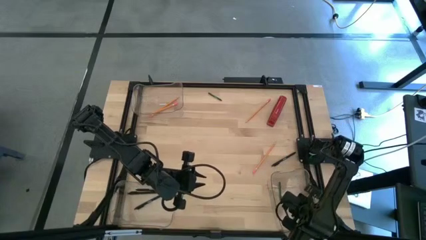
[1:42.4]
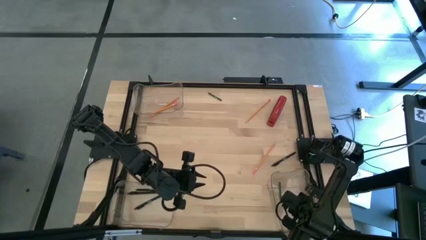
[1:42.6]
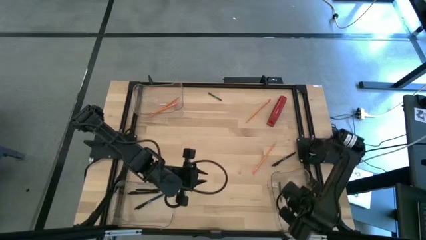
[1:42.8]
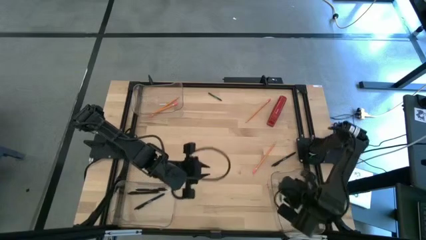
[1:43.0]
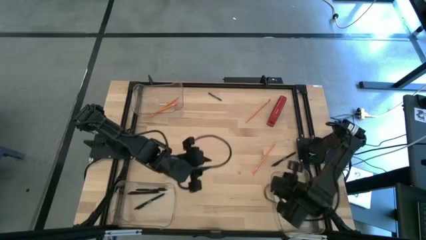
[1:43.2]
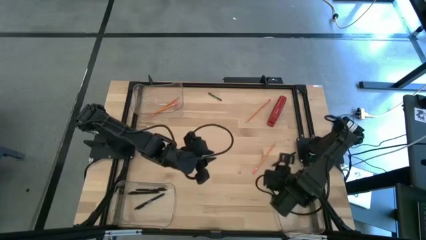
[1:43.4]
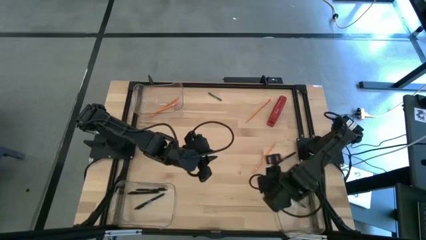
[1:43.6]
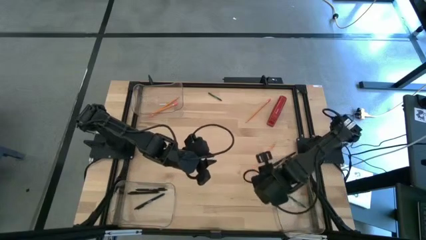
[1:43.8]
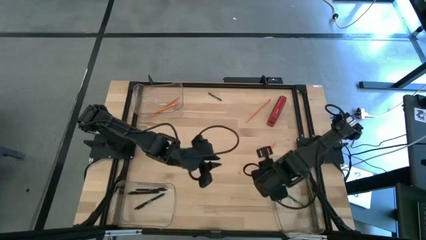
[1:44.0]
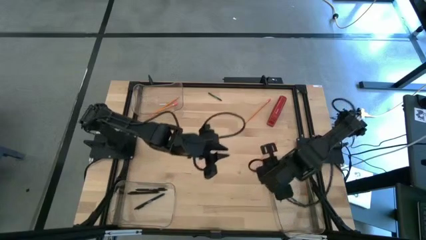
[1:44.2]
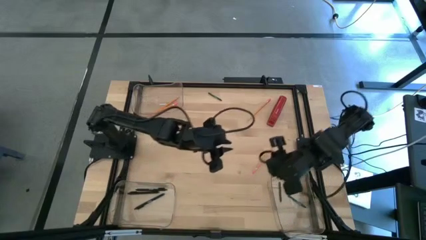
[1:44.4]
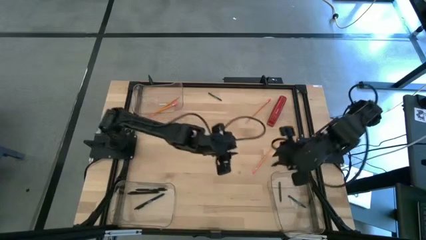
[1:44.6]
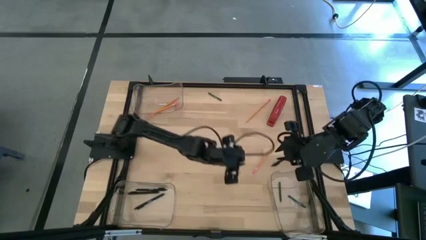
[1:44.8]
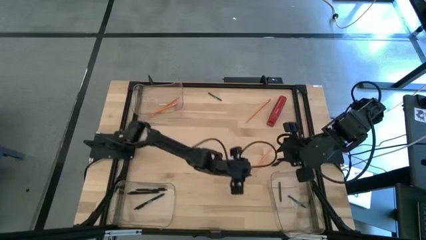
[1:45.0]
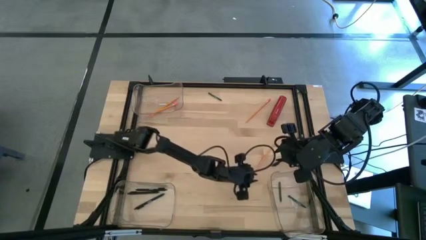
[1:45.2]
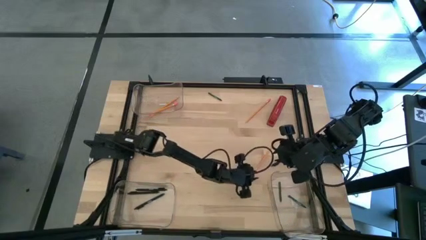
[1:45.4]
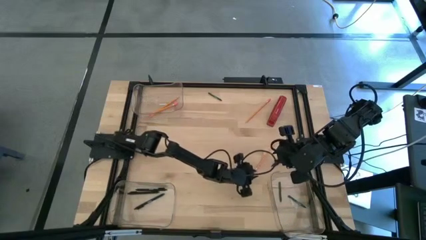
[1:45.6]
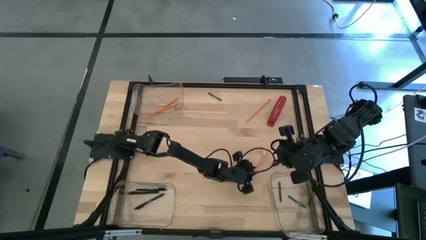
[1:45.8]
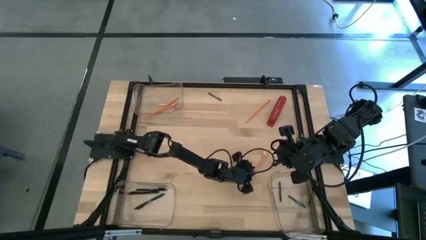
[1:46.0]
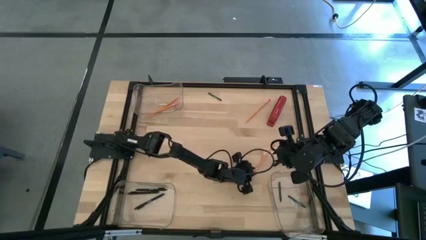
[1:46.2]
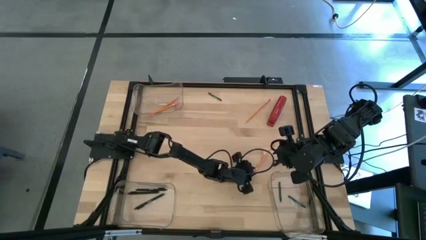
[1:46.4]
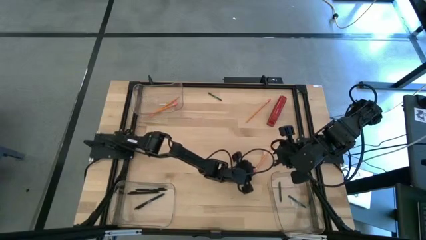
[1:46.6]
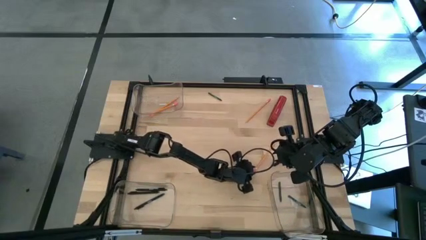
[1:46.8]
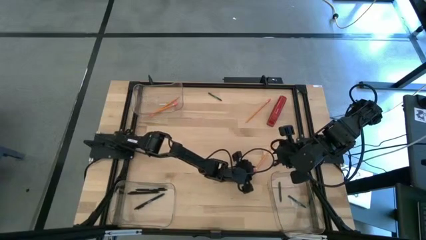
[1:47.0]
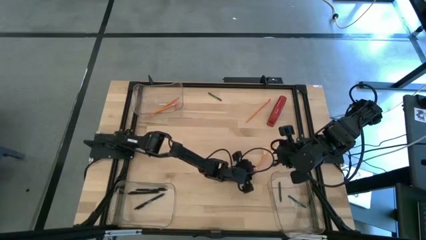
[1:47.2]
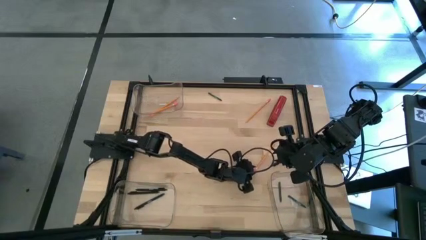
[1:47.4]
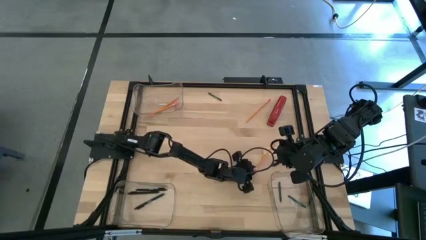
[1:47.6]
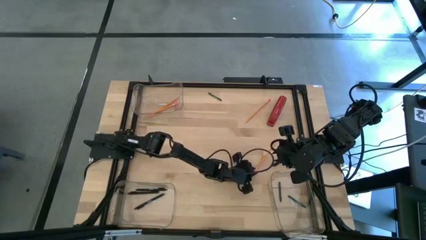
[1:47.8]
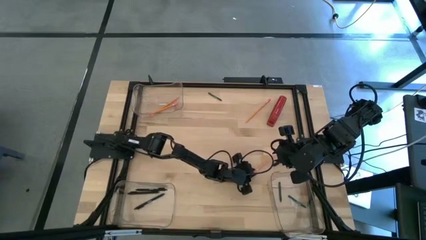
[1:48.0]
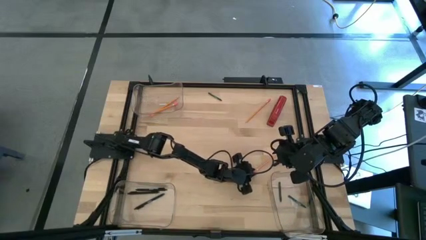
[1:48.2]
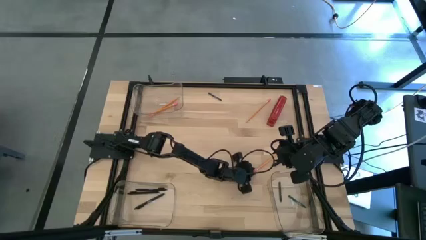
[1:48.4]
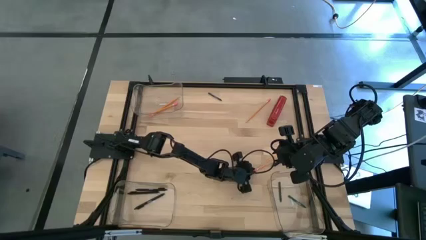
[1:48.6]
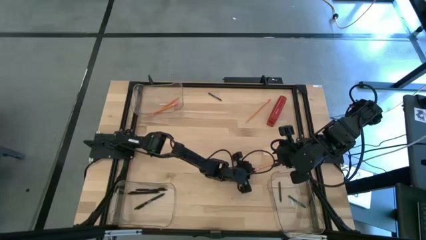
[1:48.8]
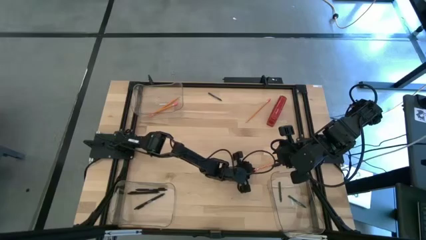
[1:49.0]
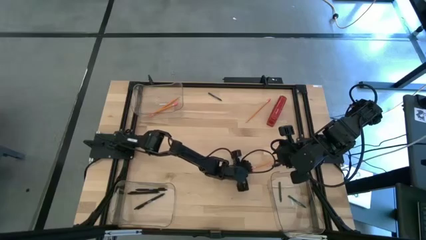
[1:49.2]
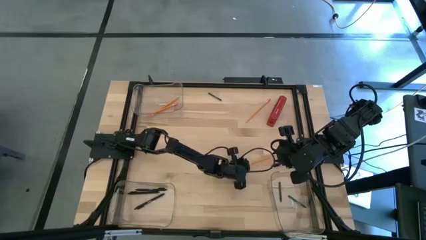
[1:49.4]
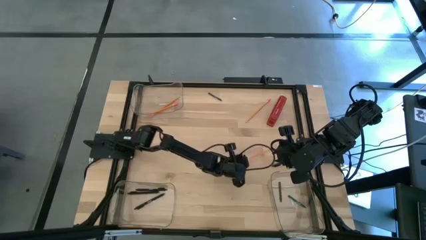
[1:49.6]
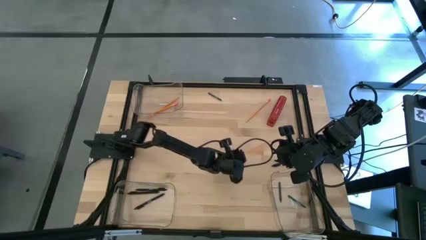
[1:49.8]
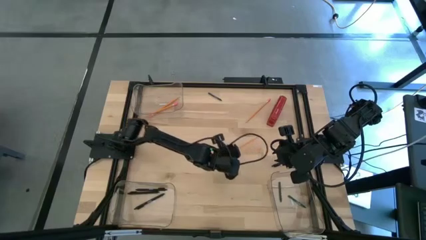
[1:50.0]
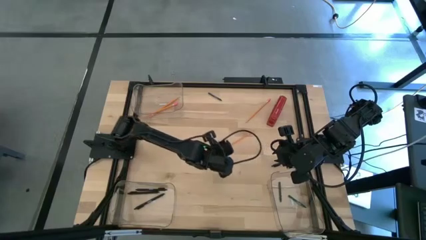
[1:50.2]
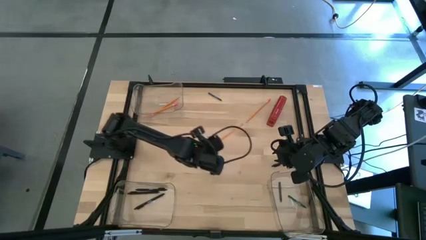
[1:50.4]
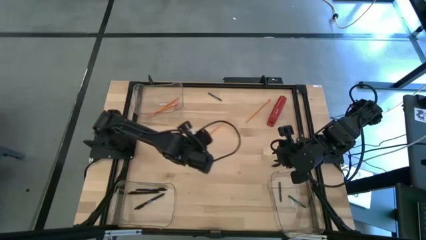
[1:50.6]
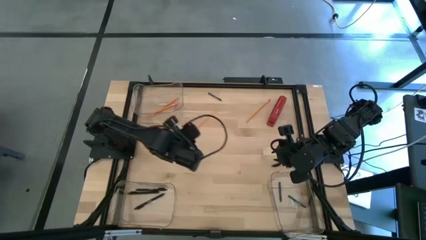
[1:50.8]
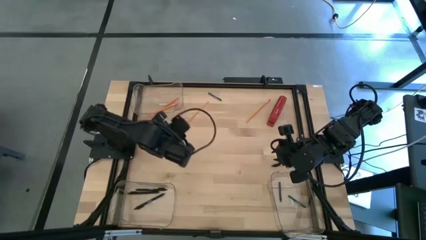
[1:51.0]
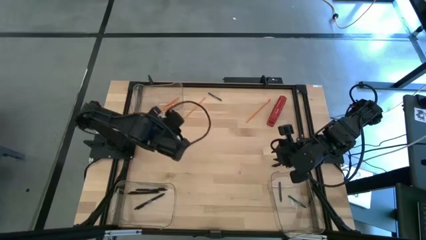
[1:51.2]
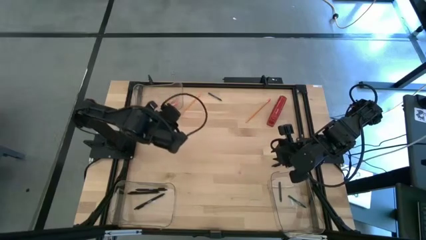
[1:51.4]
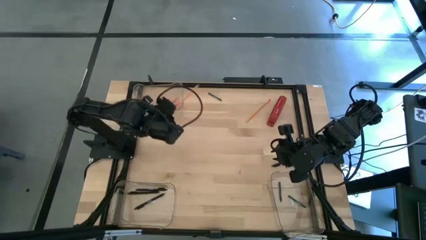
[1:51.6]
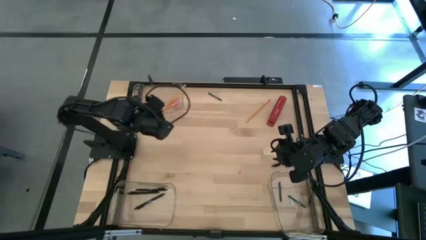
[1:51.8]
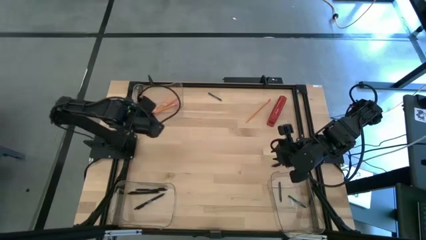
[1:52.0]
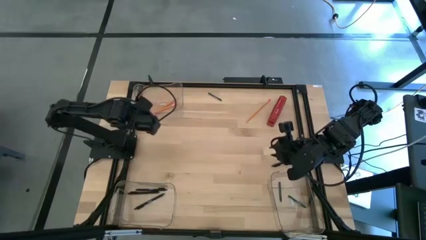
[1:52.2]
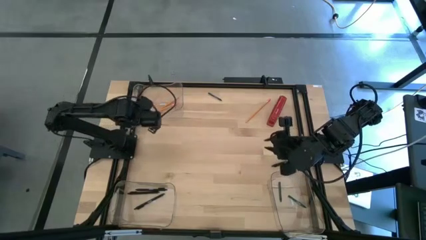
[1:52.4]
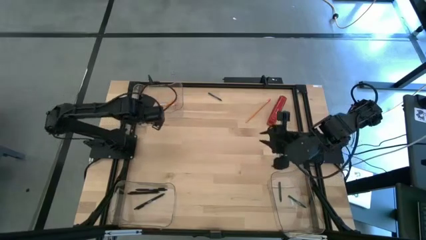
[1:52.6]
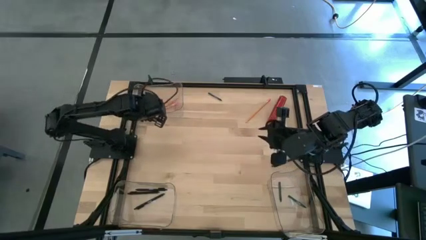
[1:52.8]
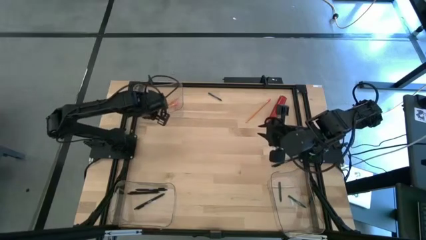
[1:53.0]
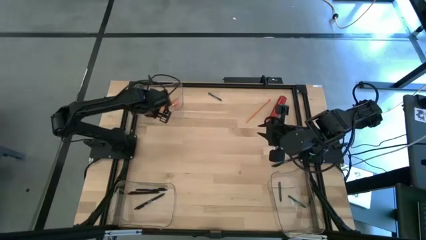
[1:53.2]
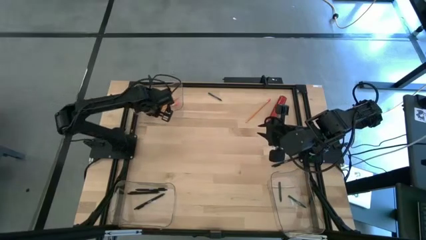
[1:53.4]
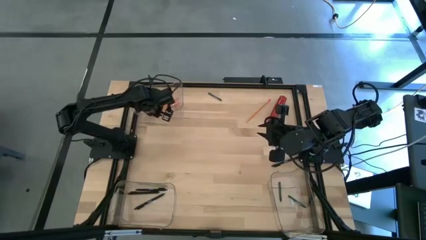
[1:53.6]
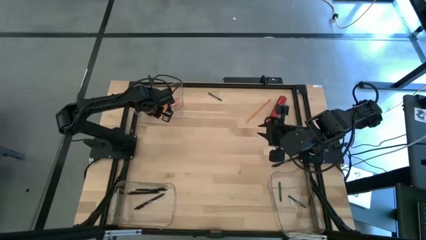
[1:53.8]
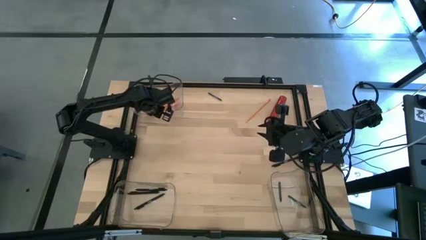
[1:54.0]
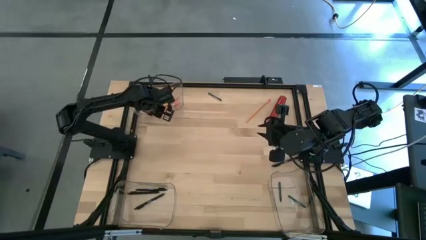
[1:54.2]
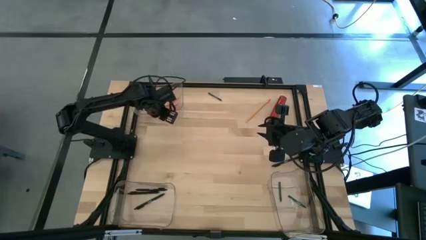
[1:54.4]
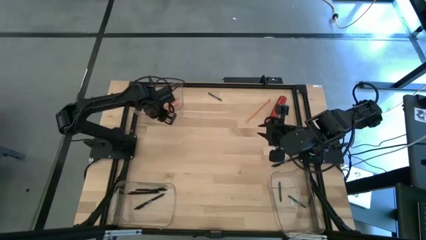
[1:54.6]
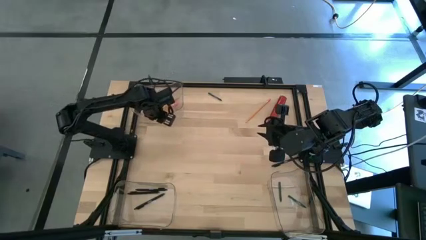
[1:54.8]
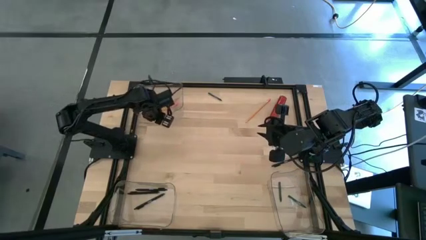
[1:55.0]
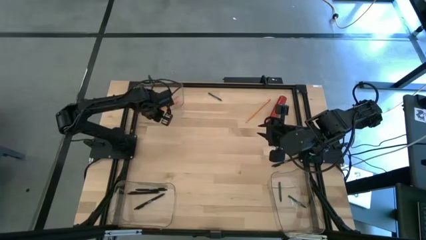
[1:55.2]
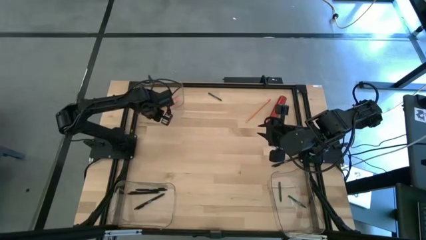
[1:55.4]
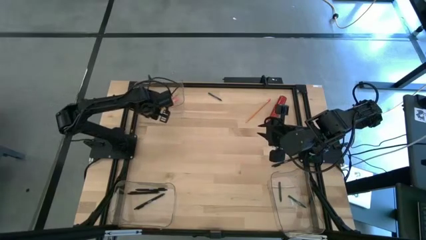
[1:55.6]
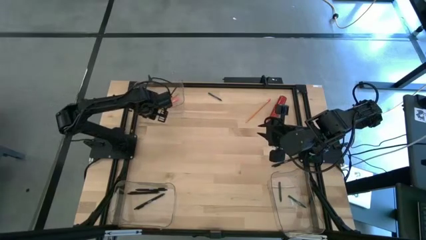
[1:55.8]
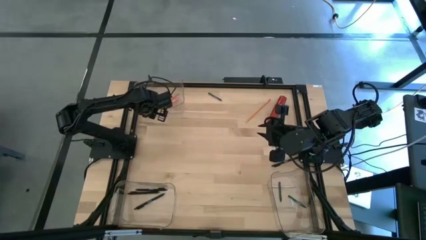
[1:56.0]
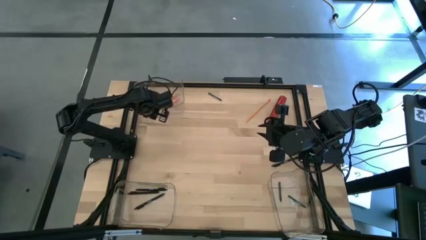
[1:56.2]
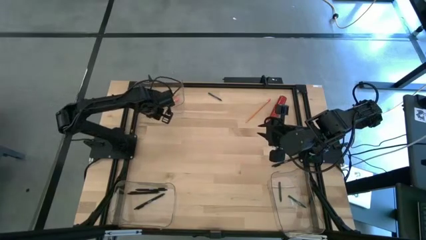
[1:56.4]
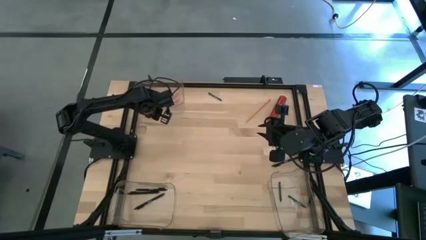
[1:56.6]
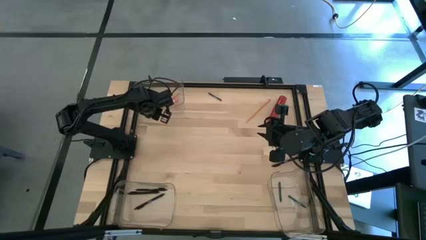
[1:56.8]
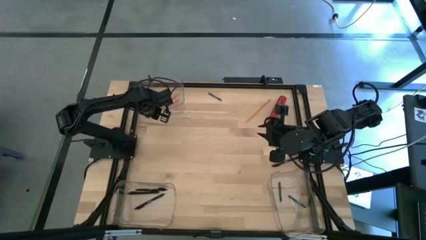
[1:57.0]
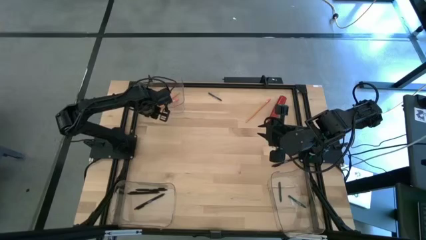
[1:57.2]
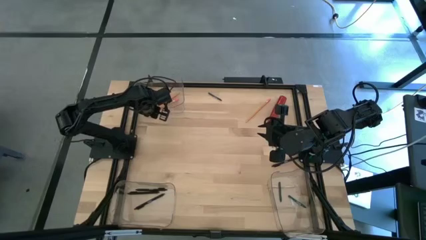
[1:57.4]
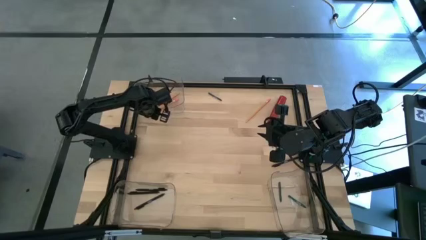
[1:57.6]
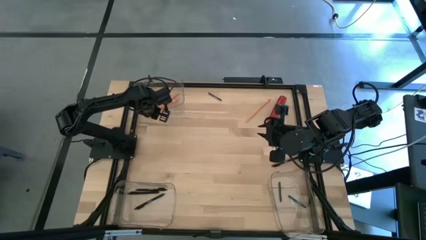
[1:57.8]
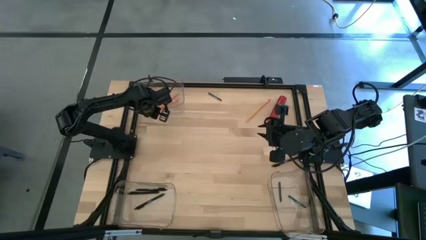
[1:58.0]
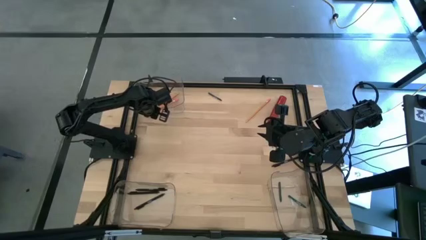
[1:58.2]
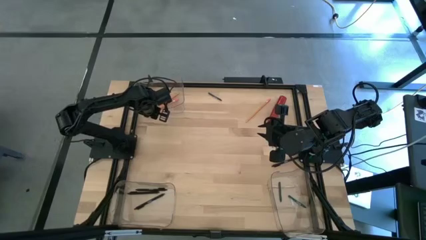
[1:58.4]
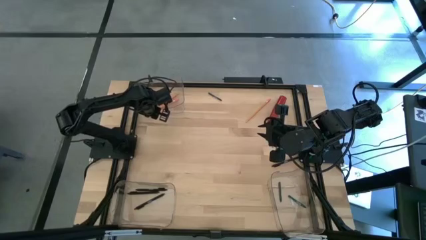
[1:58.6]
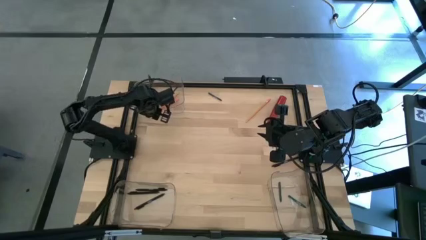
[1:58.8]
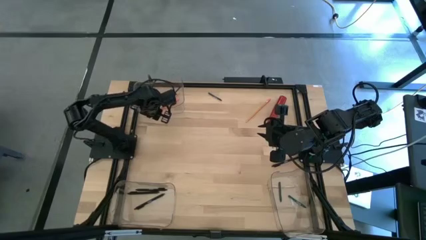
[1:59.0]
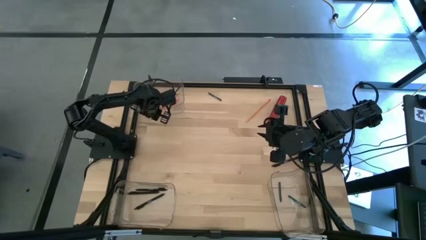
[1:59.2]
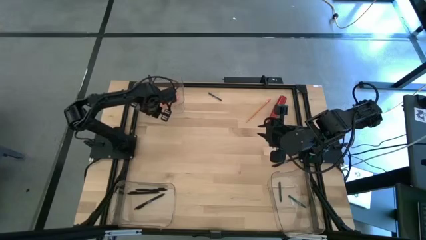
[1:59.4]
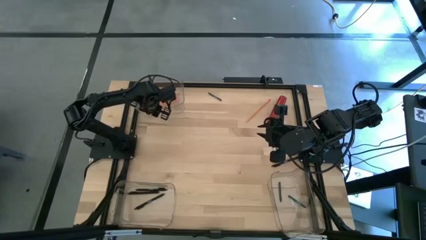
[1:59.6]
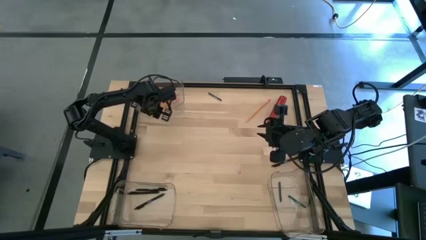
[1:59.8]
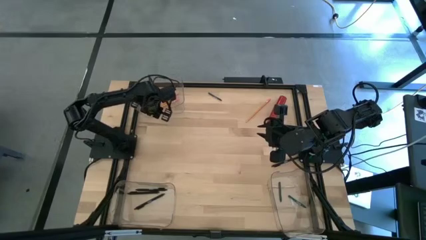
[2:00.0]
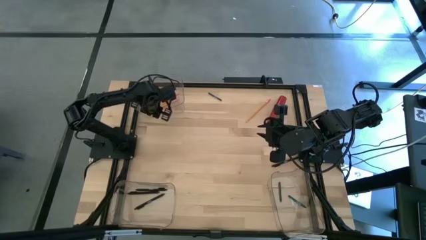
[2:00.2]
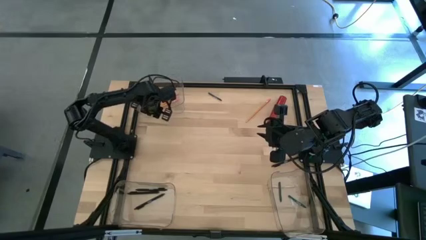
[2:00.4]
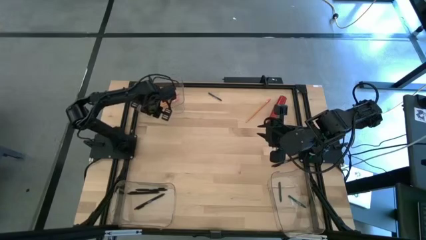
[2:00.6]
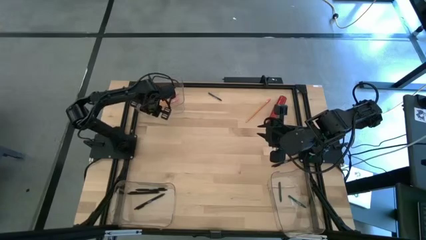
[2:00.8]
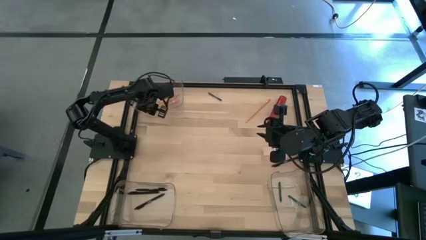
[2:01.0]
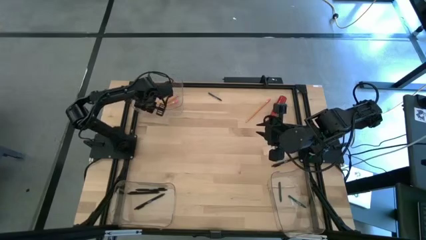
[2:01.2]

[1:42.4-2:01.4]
Task: Sort crayons/erasers/pens/pencils in bins
Put the orange pencil into the top transparent bin
